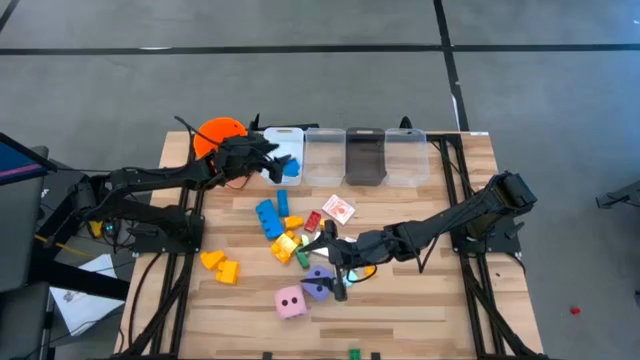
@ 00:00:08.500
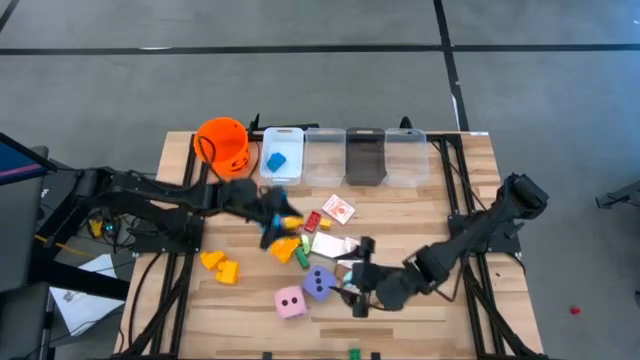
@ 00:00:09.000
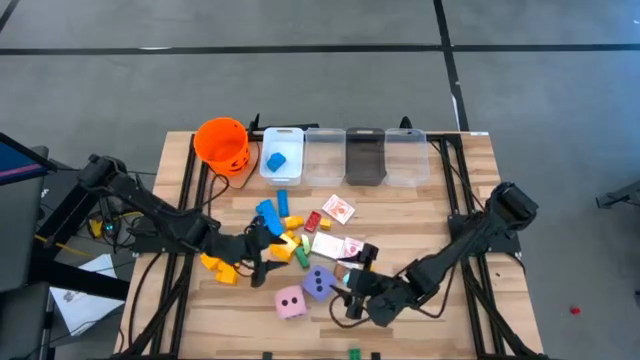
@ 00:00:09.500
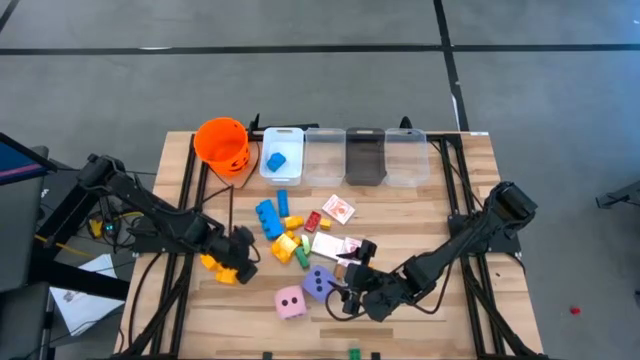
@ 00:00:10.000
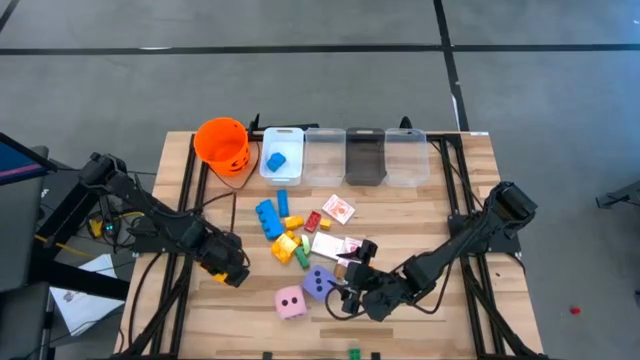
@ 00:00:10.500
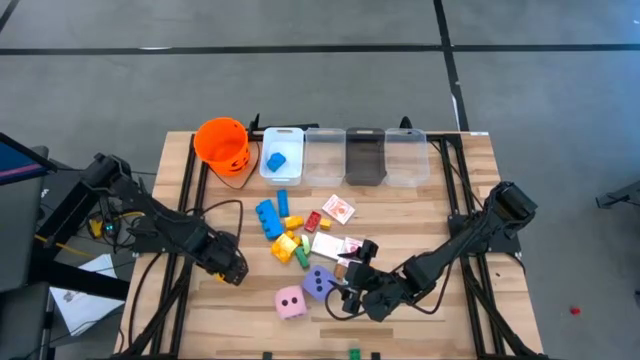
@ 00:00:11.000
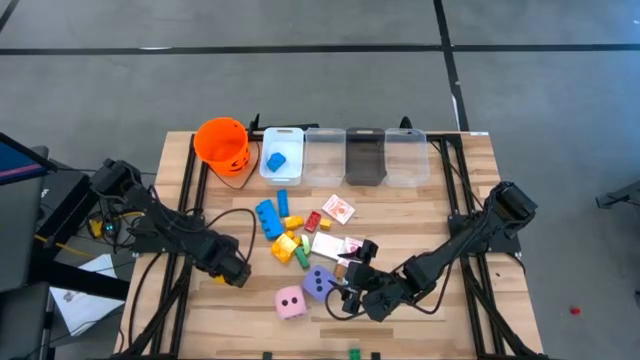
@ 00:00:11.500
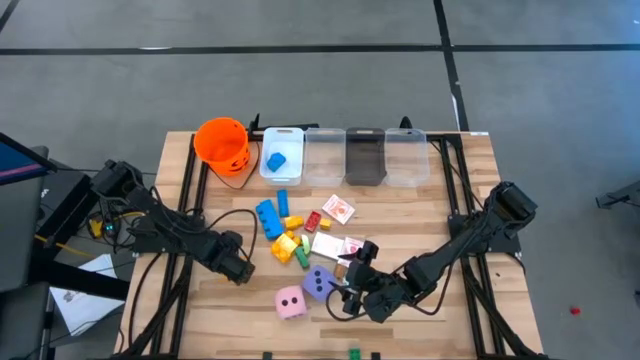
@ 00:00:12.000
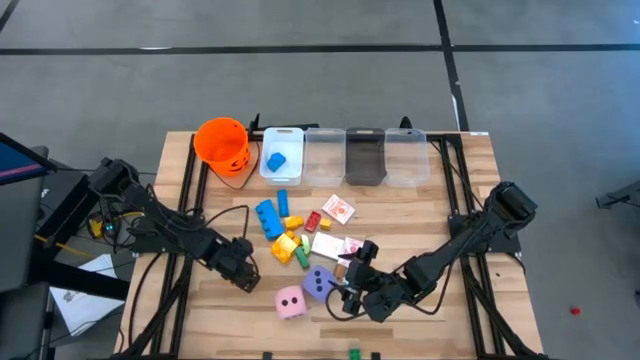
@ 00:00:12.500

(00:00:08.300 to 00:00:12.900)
Task: Pick & Place Toys
Put the big yellow game piece into the white bin

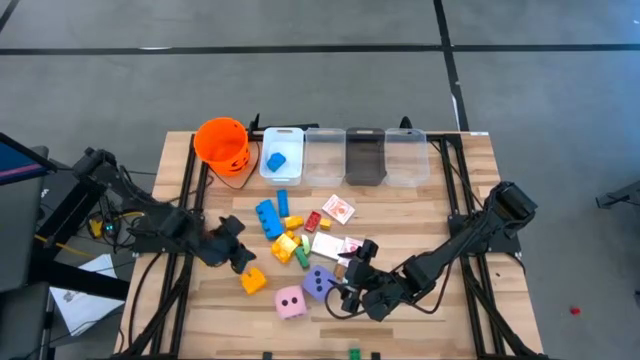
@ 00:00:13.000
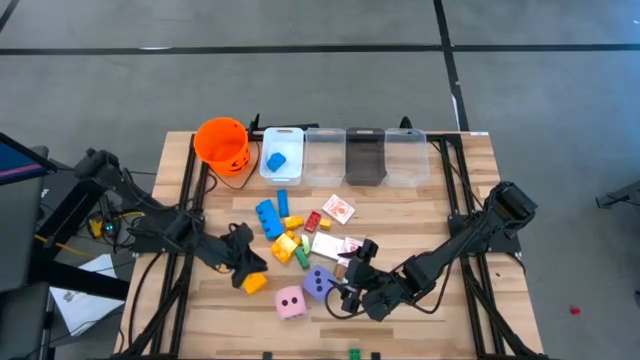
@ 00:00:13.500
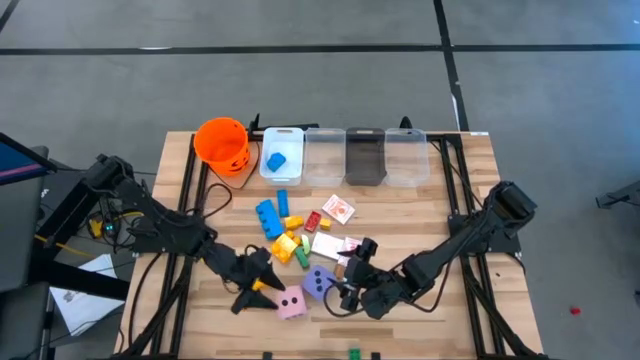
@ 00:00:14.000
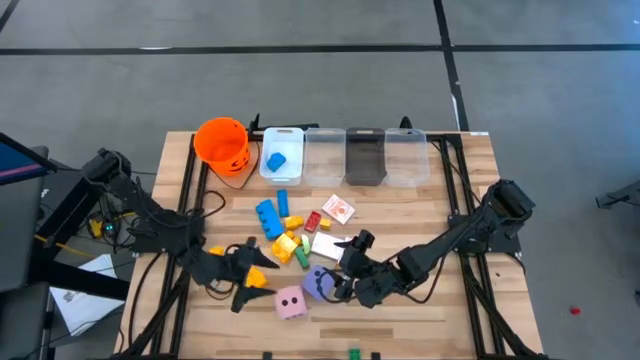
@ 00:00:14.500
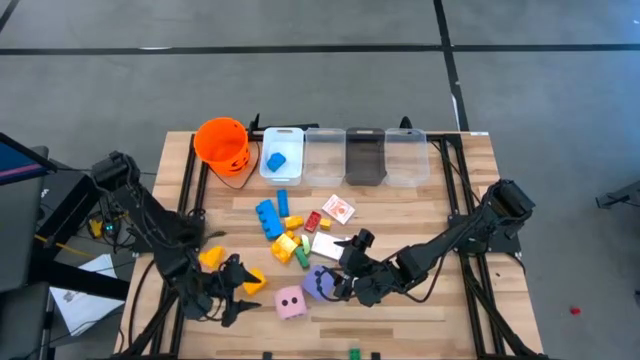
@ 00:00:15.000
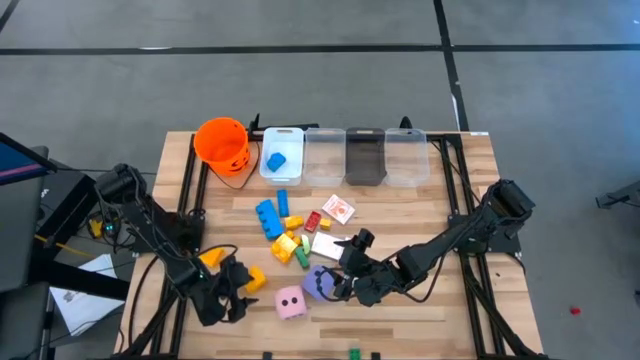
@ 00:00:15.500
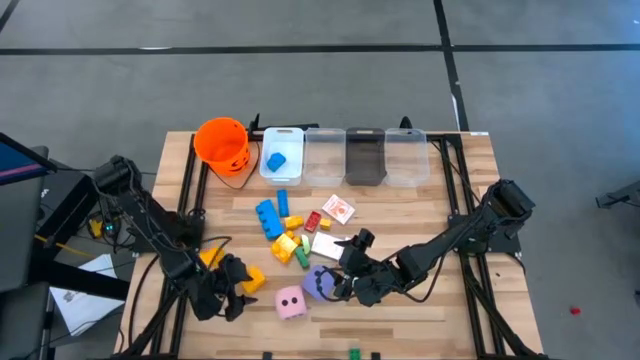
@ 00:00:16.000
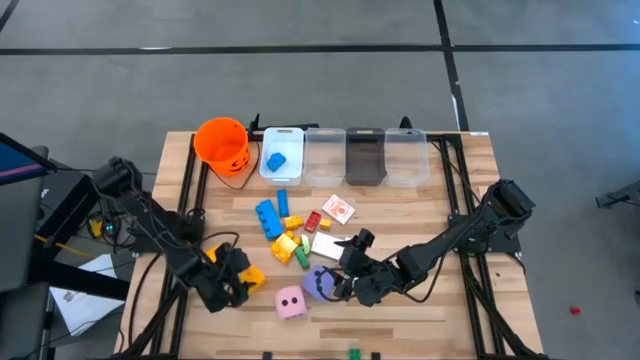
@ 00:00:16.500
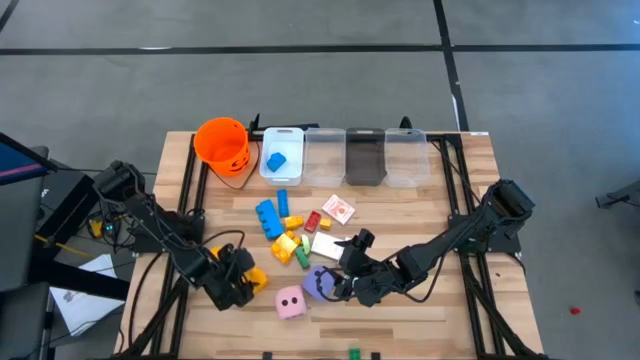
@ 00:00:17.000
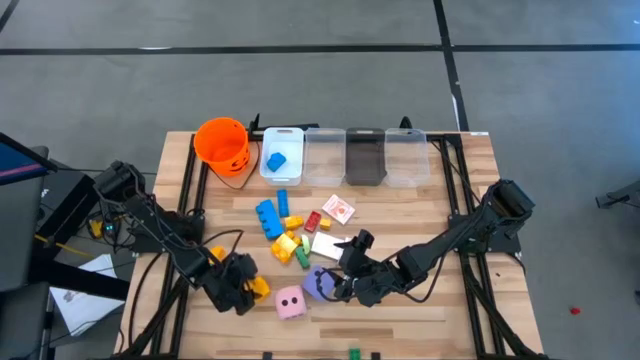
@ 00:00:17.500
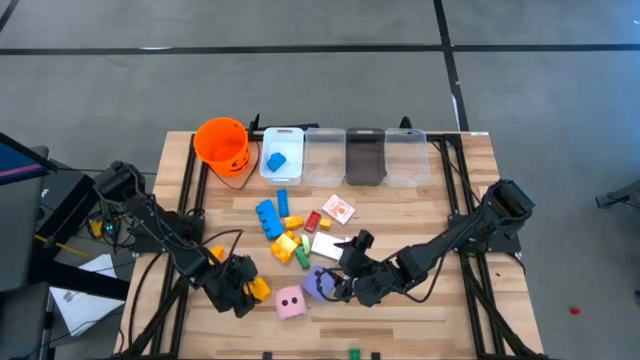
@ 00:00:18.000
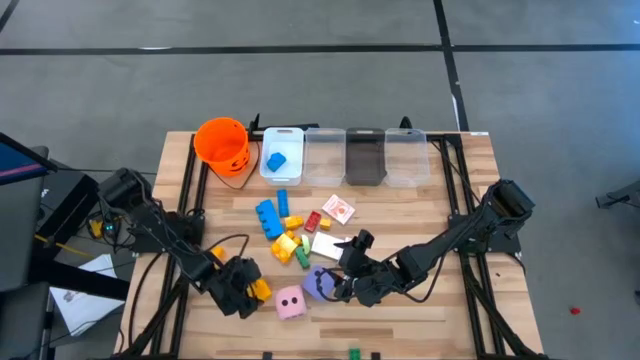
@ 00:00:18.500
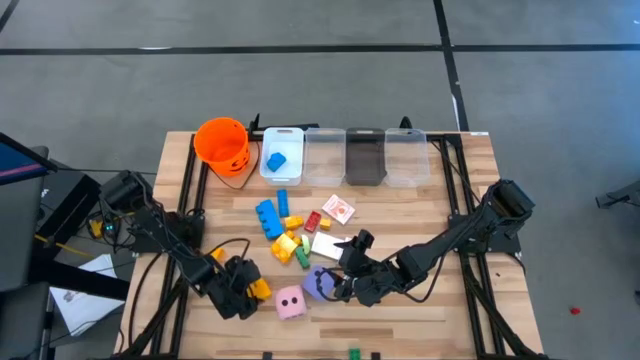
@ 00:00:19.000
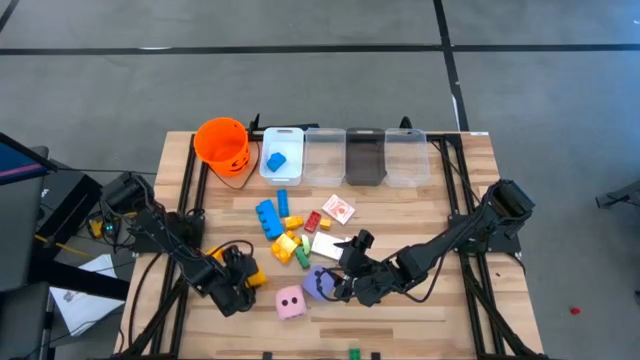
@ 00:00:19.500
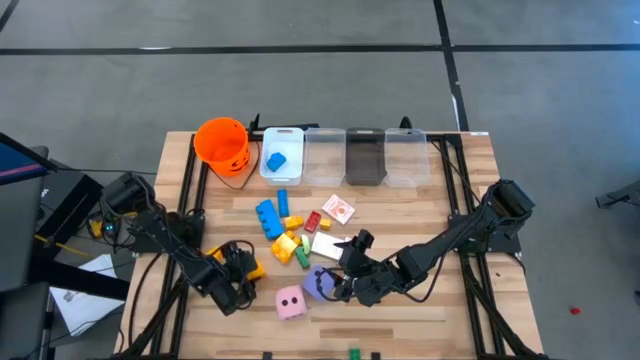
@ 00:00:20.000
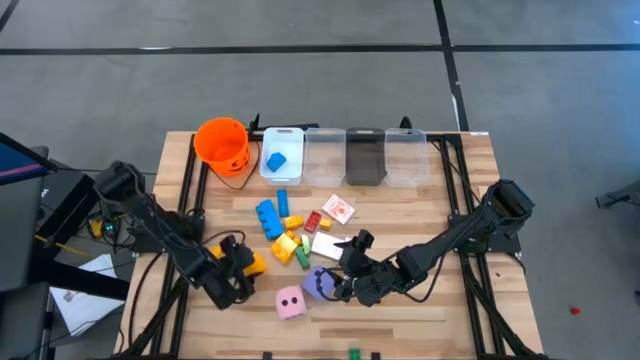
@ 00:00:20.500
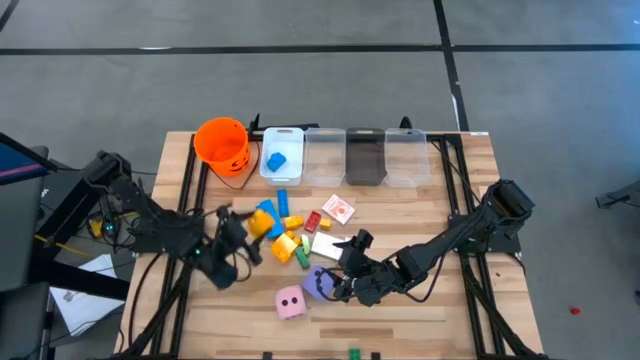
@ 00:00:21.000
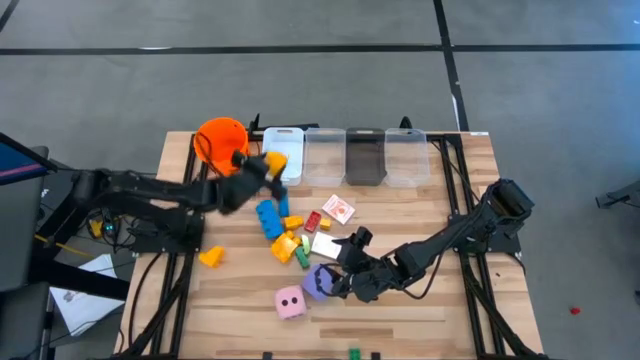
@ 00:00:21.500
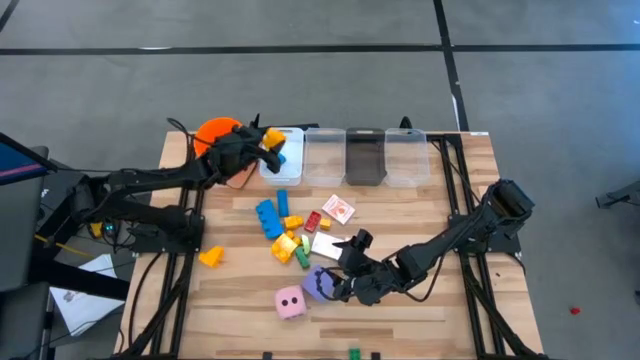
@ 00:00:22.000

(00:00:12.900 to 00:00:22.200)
Put the big yellow game piece into the white bin

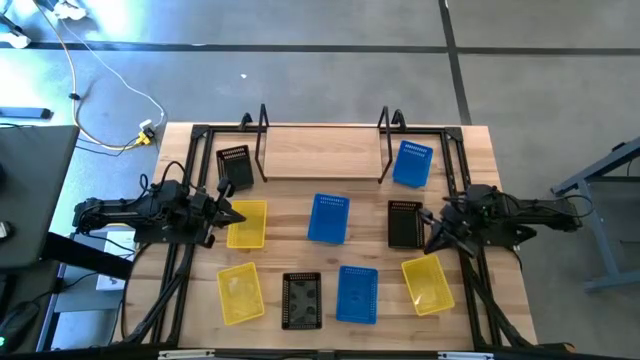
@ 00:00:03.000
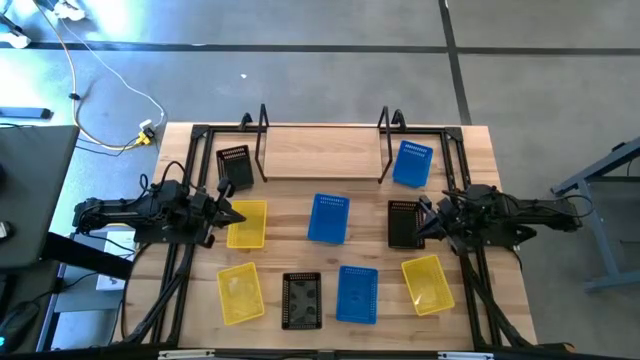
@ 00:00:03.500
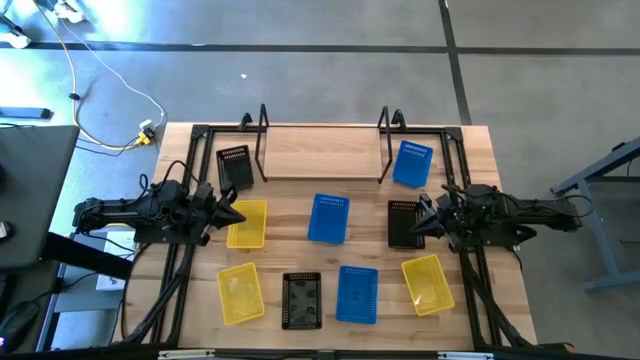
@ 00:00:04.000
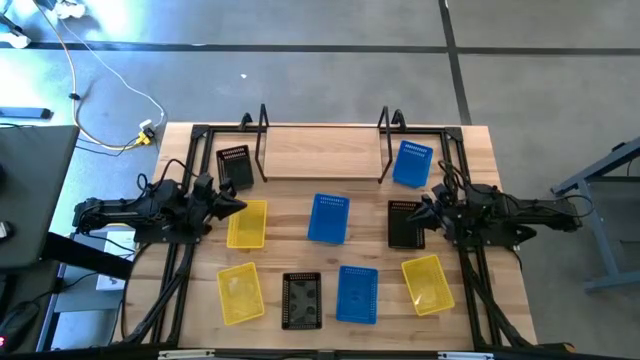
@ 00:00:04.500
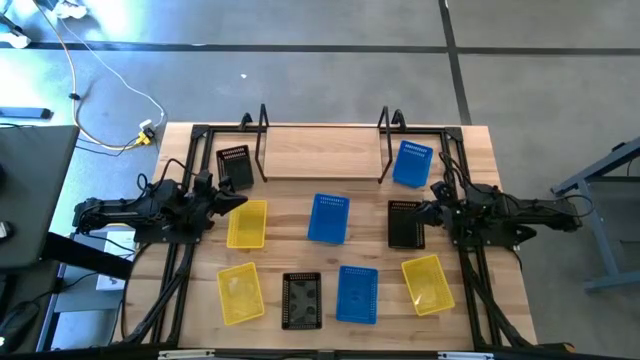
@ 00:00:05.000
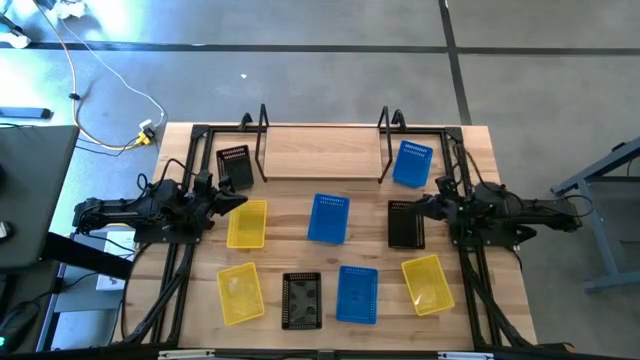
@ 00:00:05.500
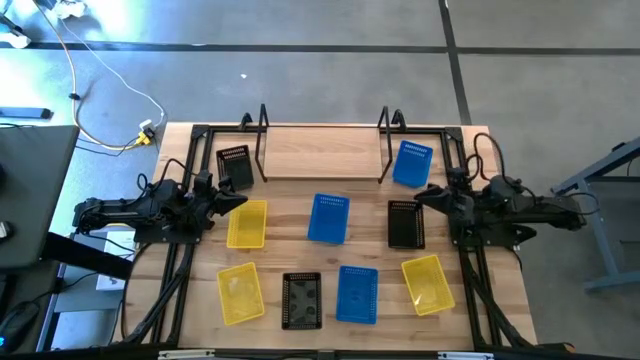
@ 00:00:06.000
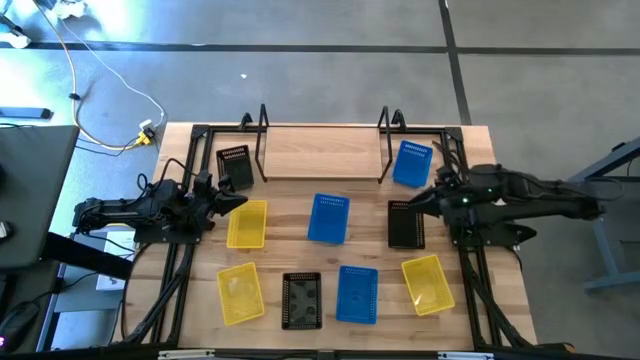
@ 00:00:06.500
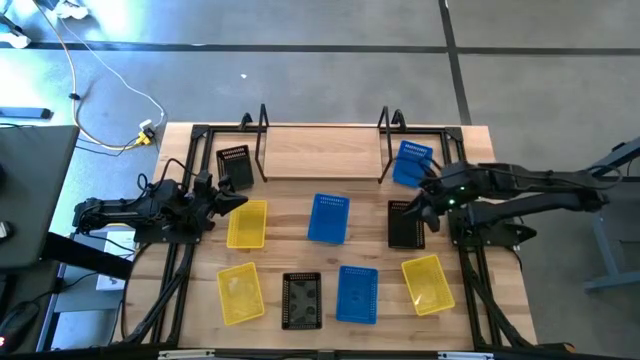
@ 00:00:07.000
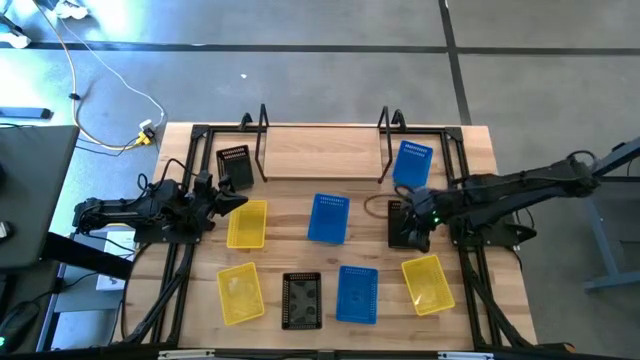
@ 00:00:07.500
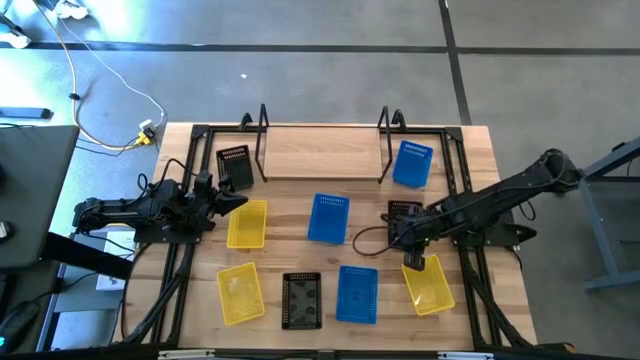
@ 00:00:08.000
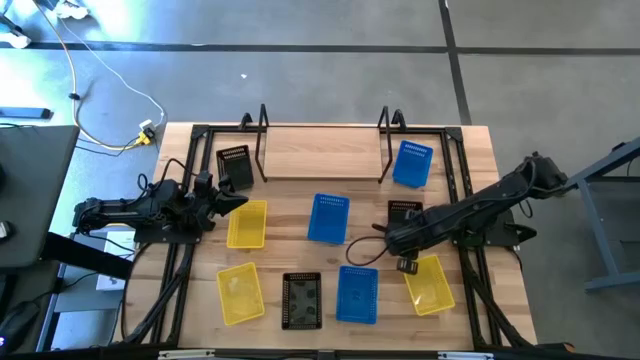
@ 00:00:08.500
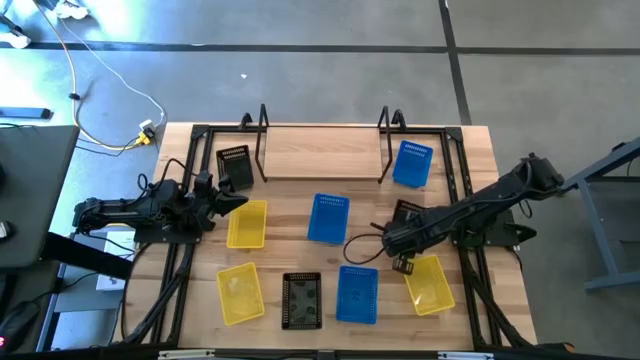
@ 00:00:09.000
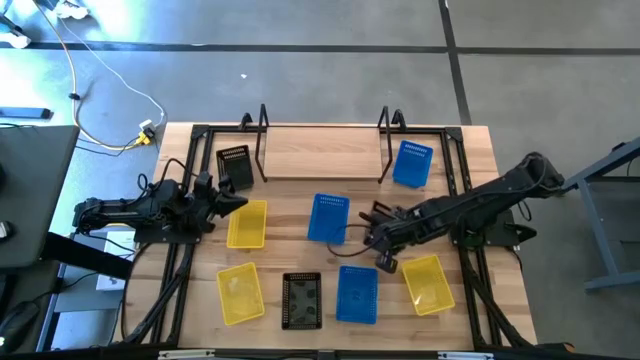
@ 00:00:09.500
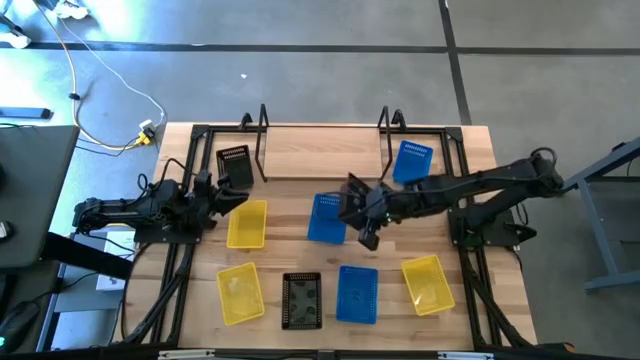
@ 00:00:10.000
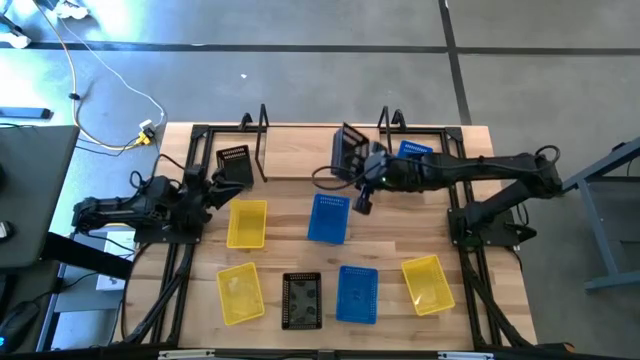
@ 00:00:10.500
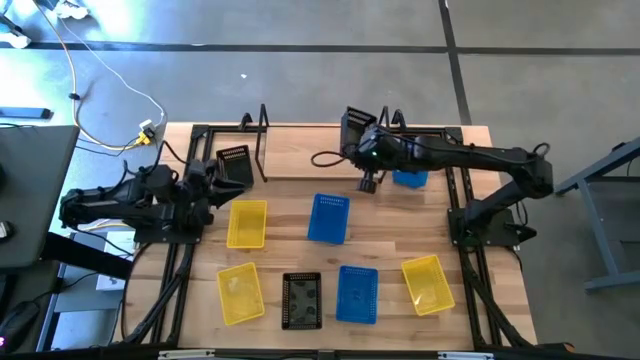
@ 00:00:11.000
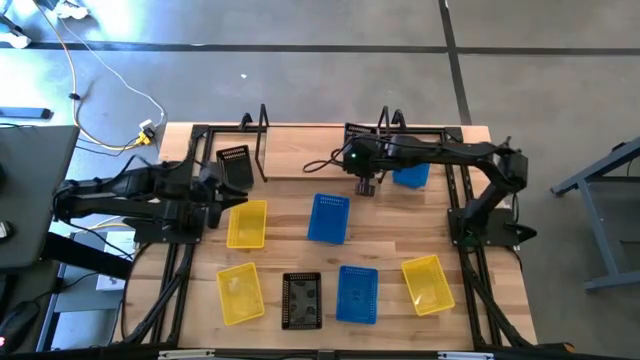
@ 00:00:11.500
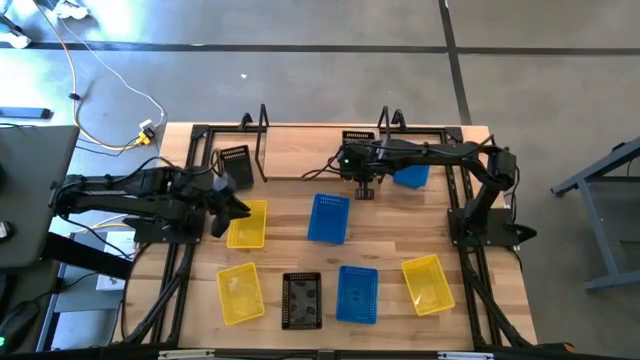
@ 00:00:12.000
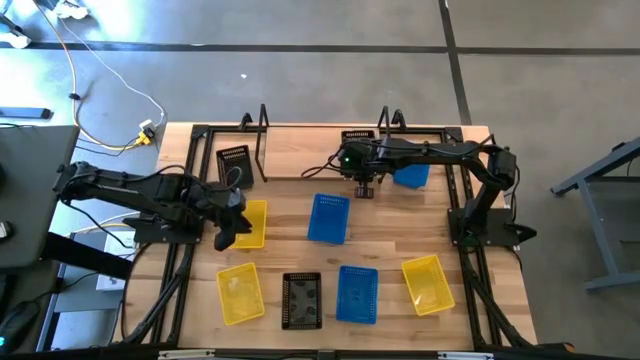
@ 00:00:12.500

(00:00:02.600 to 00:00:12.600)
Task: Stack baskets on shelf by color
Put the middle right black basket on the shelf
